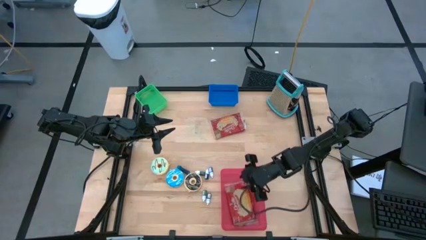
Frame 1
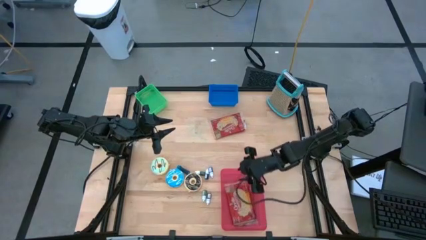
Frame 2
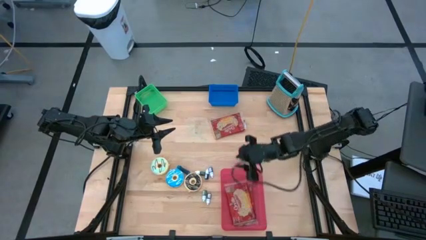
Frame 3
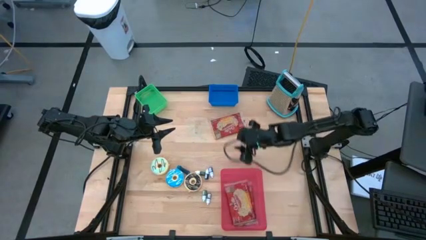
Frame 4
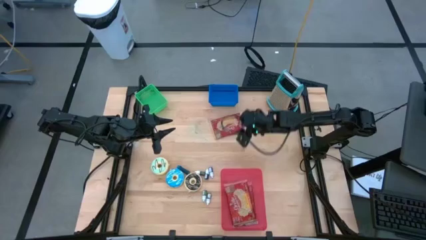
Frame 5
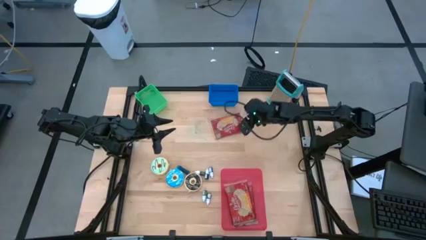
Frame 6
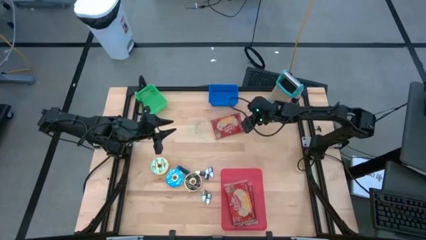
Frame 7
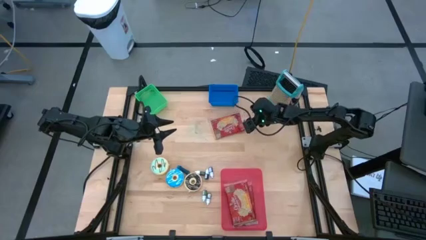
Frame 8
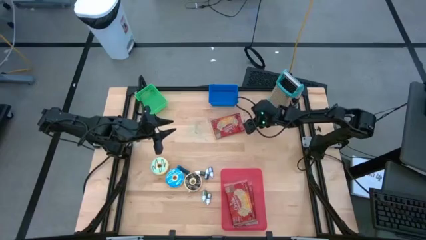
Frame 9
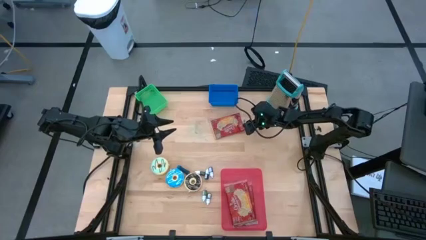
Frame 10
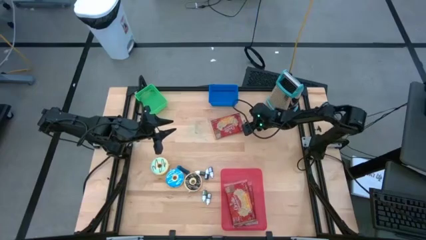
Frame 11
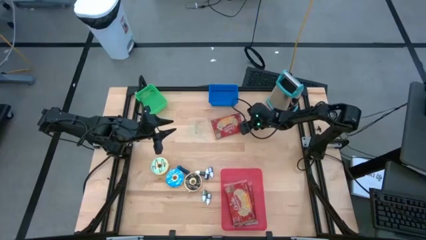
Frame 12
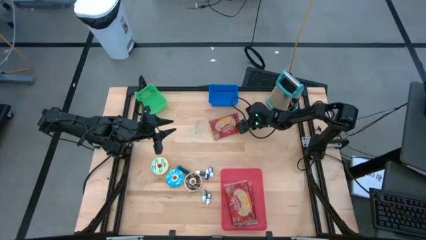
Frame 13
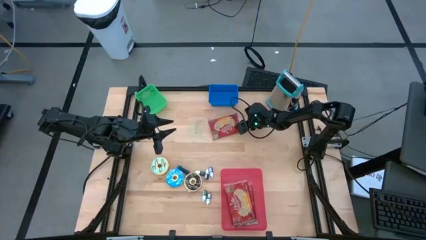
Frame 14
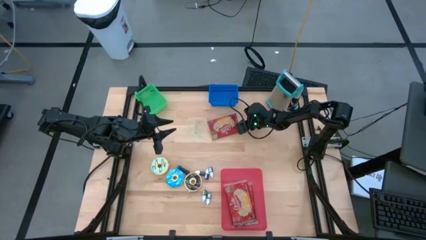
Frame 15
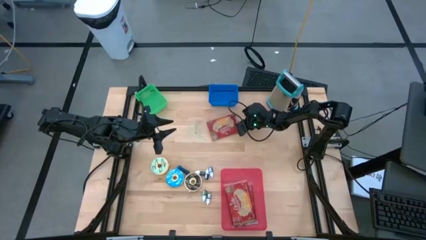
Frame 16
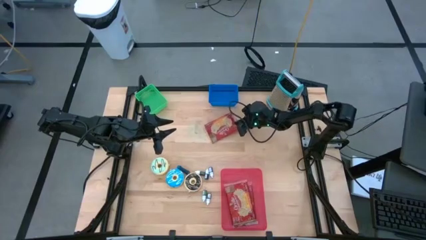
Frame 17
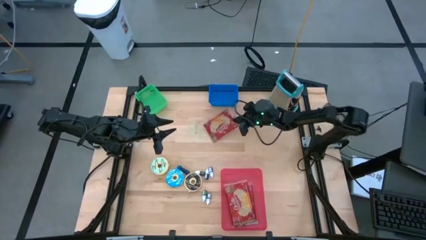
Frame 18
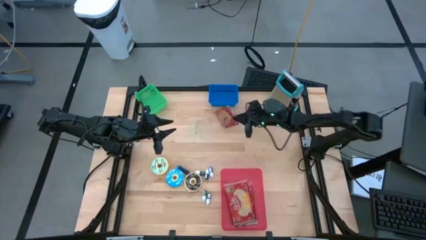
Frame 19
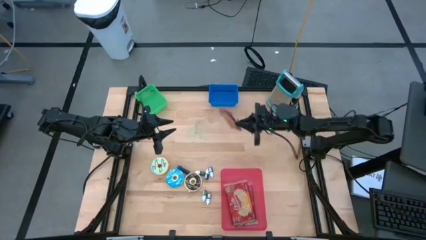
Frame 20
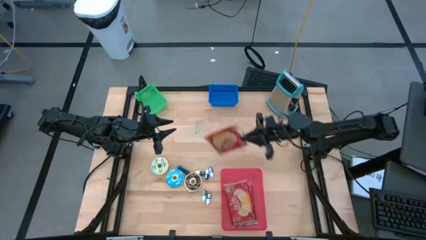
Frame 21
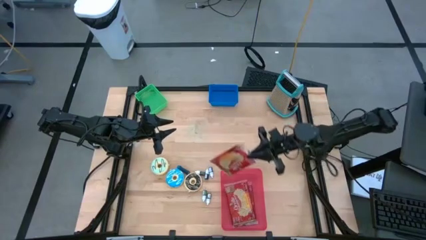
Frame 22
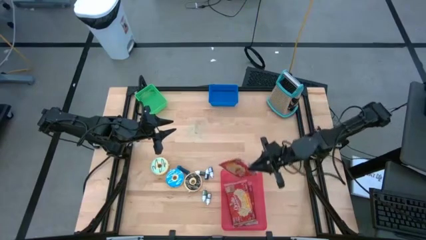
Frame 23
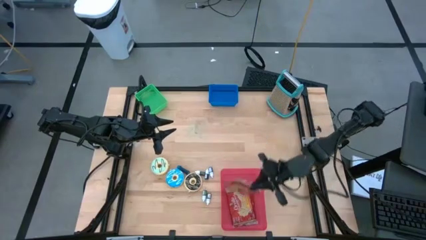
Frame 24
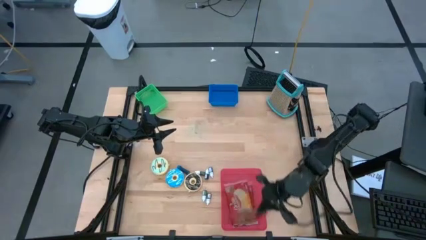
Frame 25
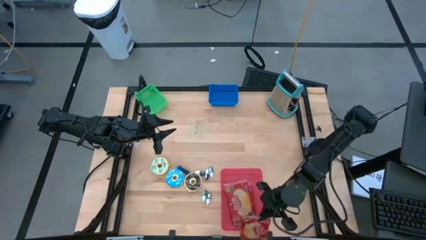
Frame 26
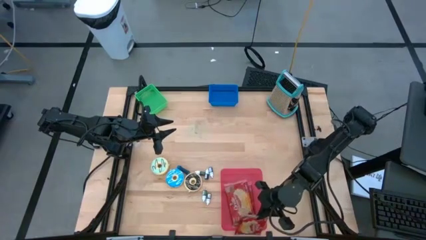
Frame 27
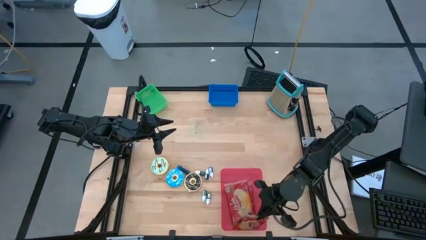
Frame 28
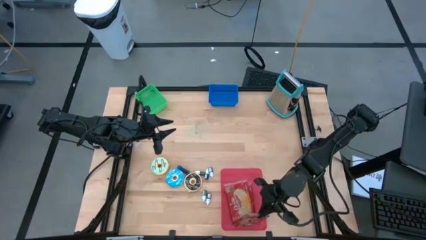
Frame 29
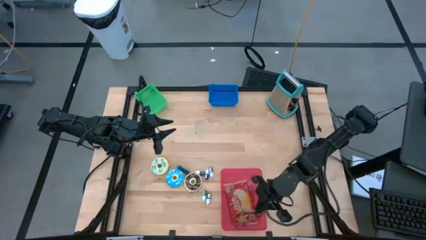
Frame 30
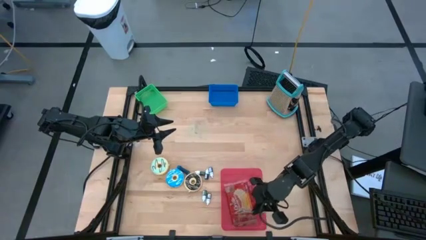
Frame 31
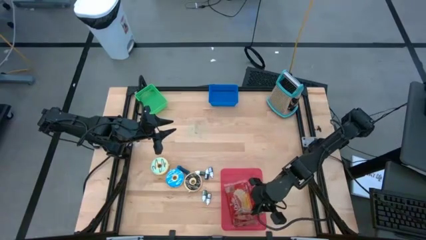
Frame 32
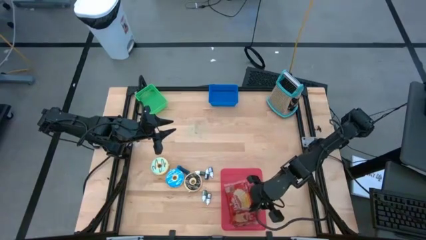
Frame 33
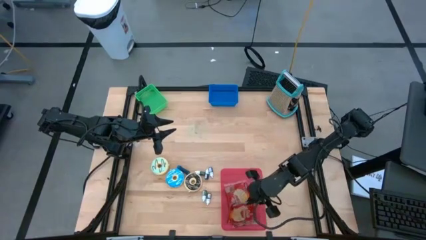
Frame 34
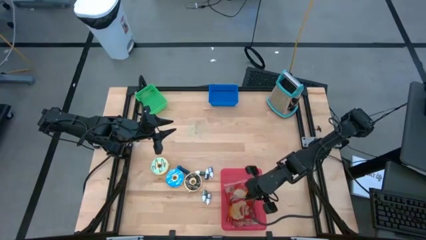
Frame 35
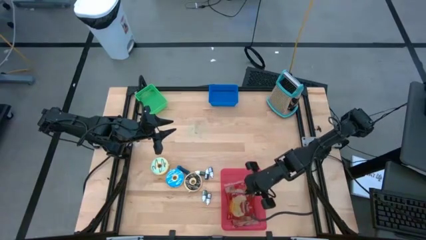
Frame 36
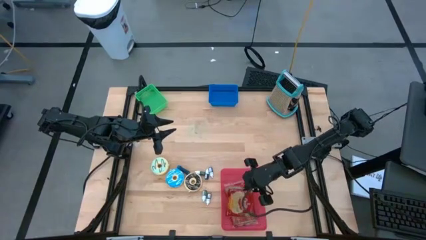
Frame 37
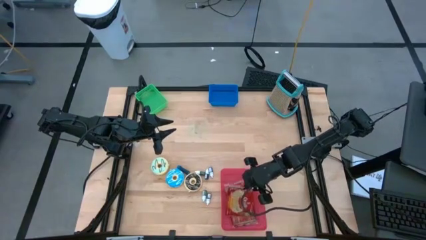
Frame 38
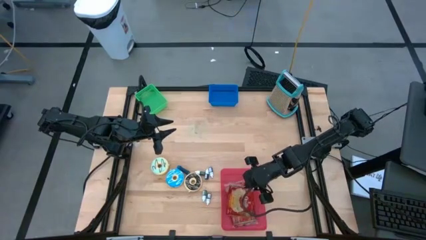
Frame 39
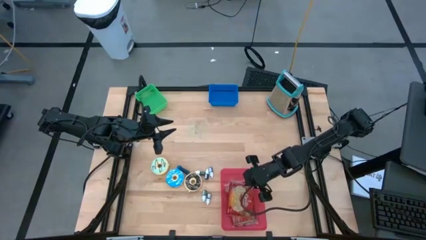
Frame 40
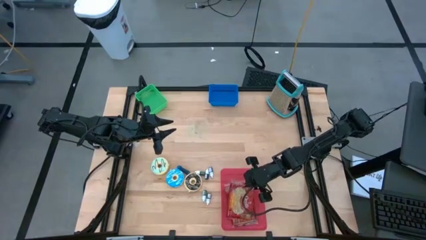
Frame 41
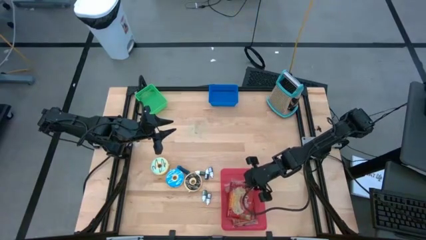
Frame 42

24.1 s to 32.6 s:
Stack the red popcorn bag on top of the red popcorn bag in the red bin

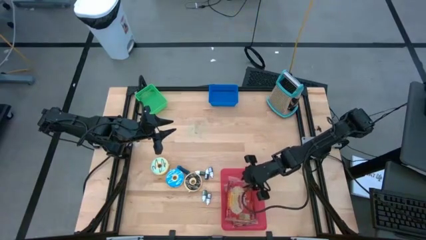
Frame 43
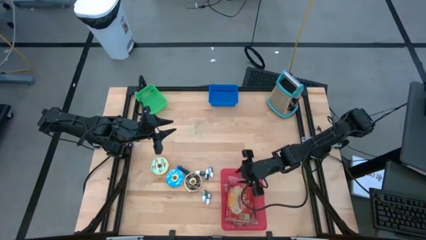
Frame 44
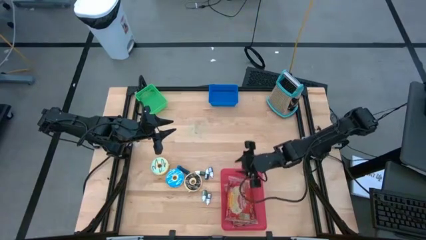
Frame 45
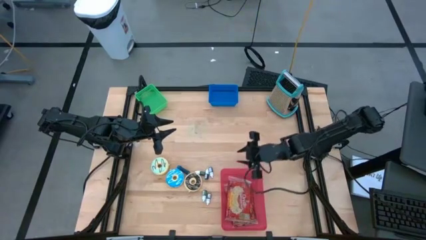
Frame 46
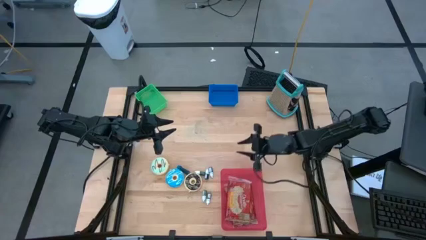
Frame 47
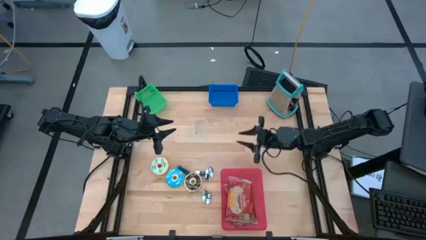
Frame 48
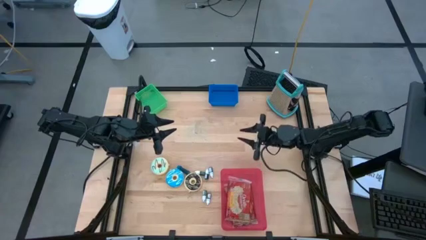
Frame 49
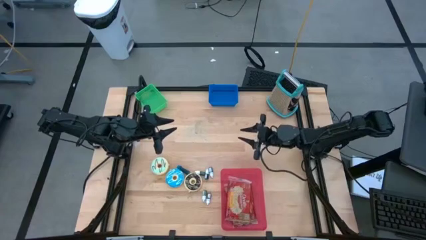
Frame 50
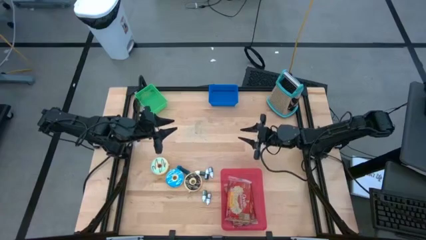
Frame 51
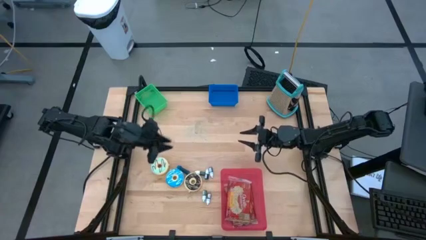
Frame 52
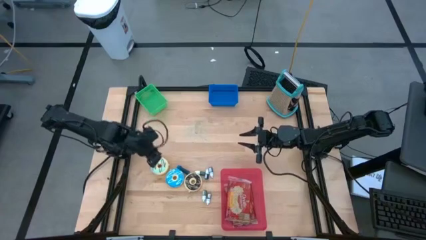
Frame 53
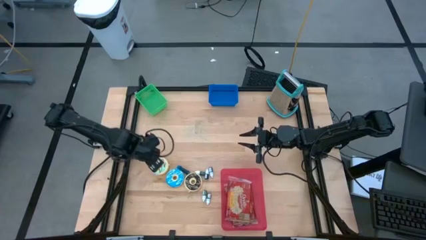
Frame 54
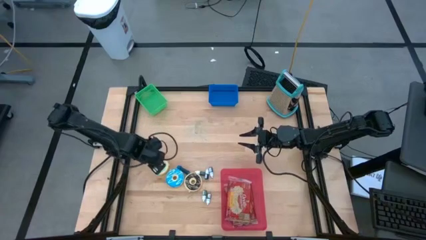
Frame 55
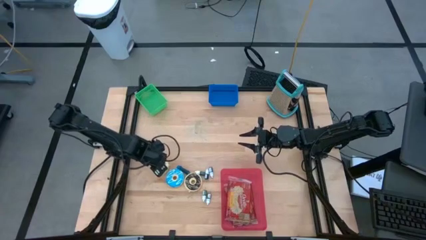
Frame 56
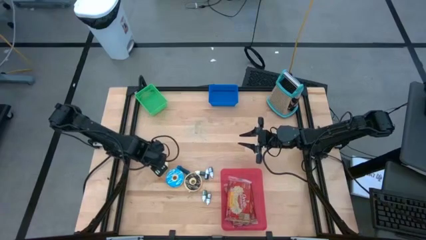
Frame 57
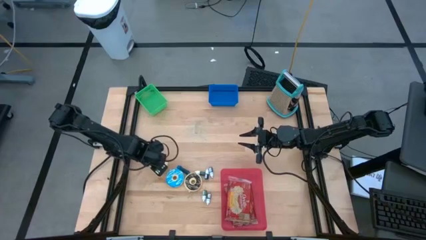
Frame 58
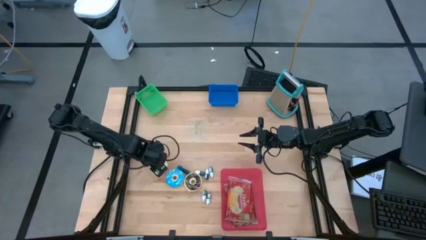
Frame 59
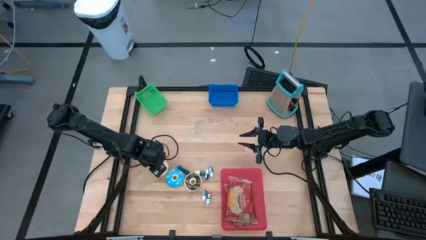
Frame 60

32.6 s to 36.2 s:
Put the light blue donut into the green bin

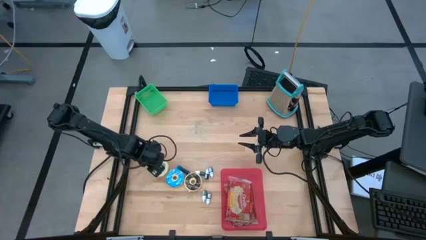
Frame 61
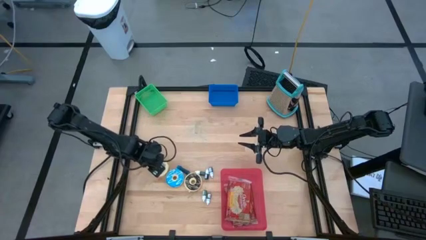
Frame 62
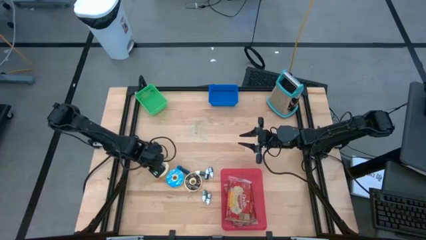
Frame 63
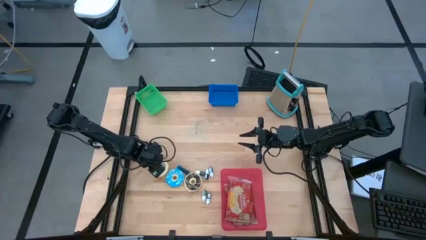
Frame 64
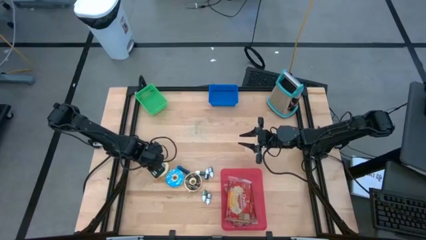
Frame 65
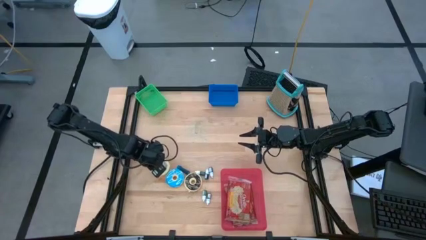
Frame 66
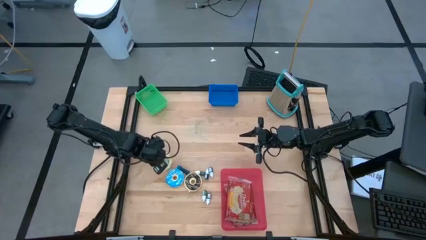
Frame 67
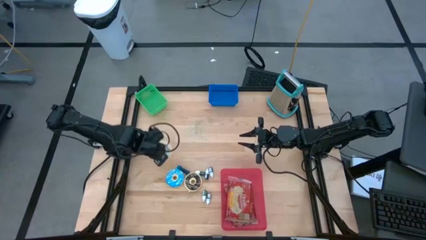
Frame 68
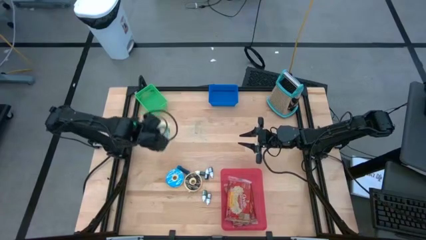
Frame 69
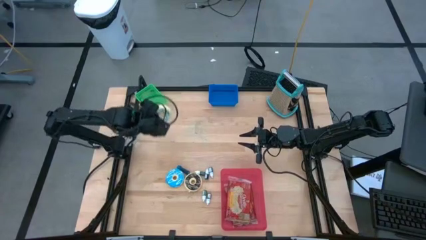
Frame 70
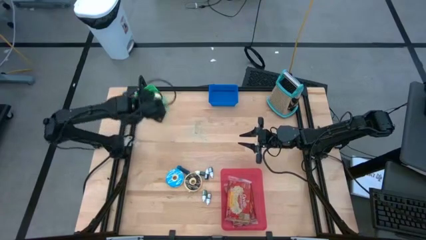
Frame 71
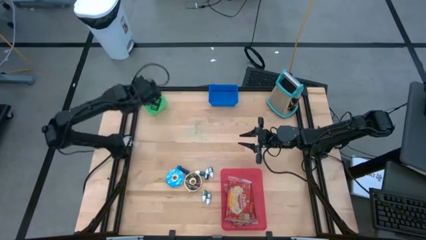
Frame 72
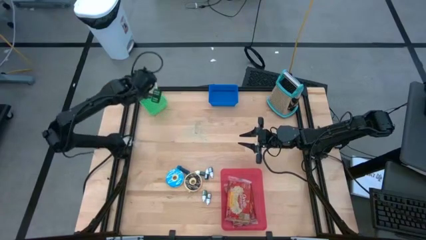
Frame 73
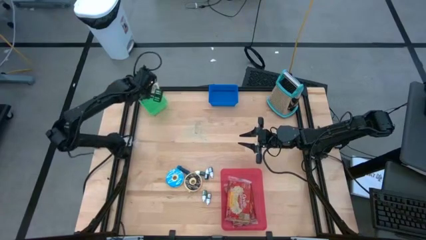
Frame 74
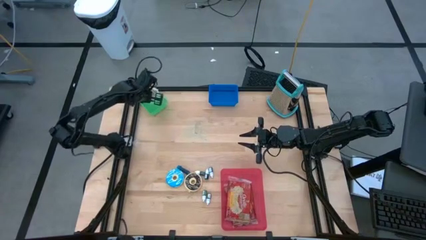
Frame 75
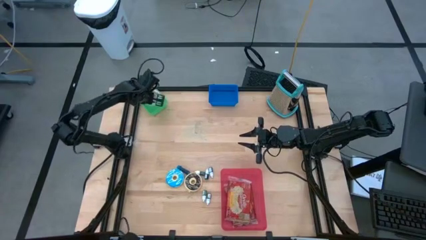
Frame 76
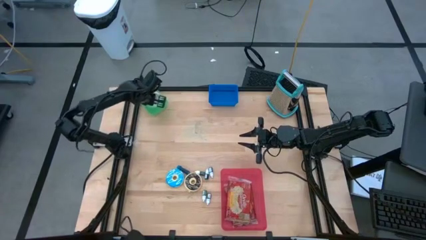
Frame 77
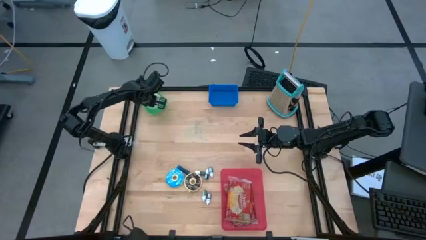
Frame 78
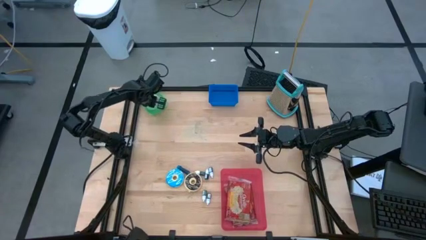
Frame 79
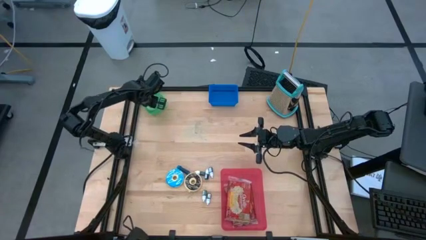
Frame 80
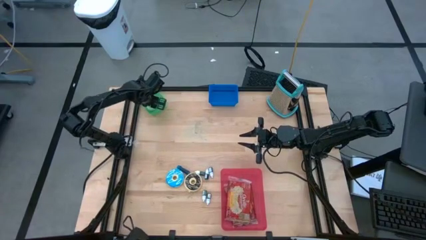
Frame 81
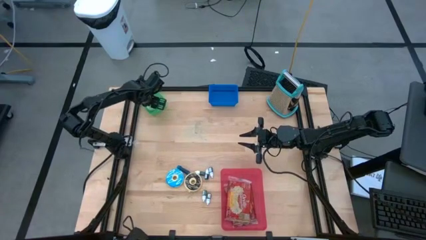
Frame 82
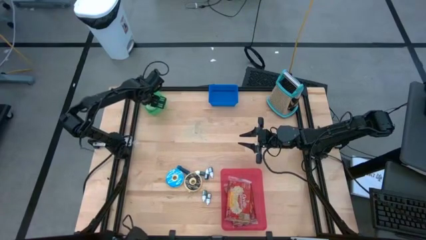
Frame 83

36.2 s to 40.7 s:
Put the light blue donut into the green bin
